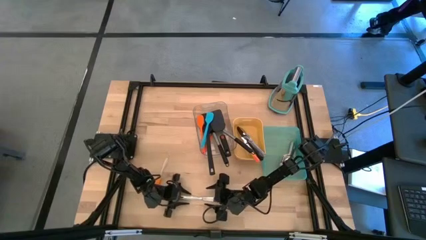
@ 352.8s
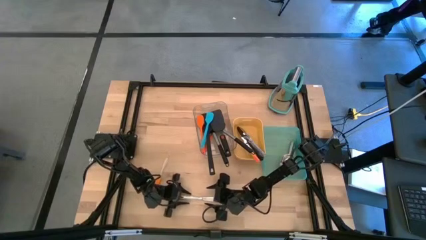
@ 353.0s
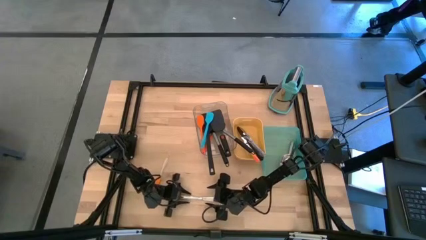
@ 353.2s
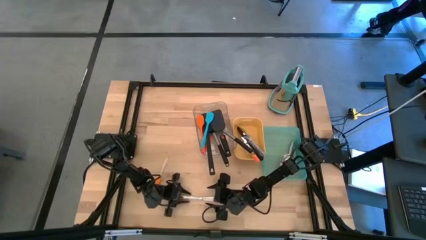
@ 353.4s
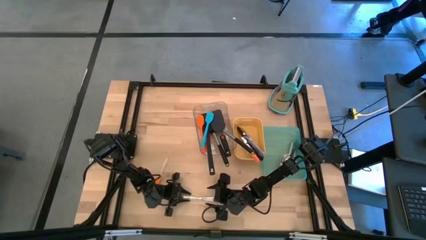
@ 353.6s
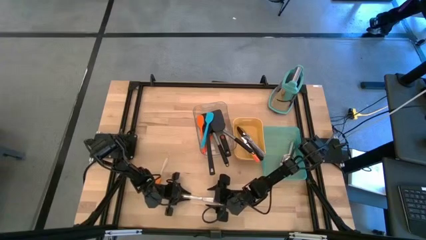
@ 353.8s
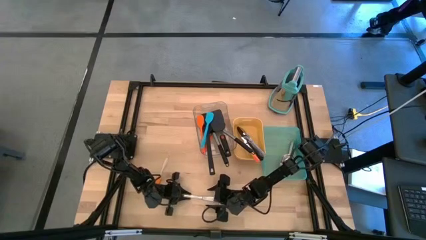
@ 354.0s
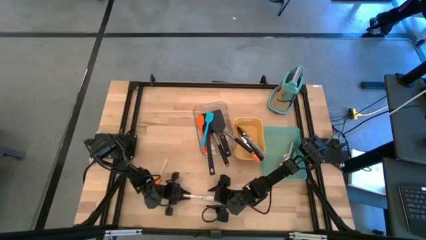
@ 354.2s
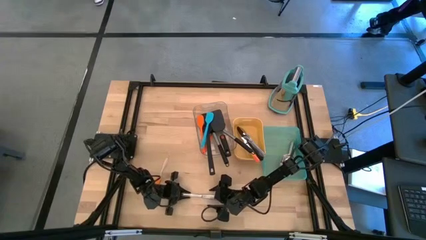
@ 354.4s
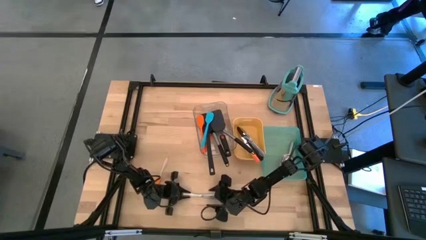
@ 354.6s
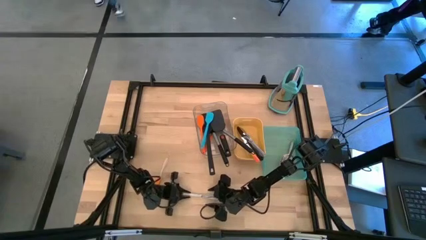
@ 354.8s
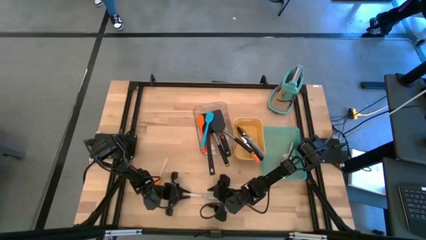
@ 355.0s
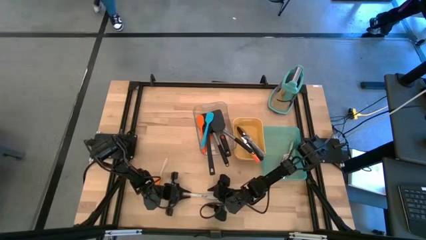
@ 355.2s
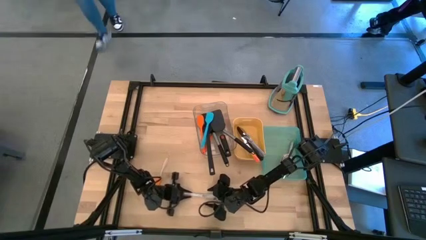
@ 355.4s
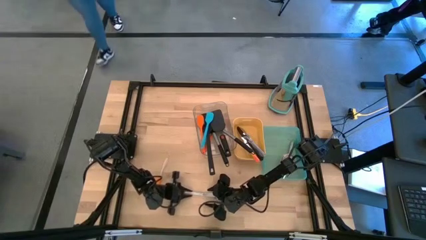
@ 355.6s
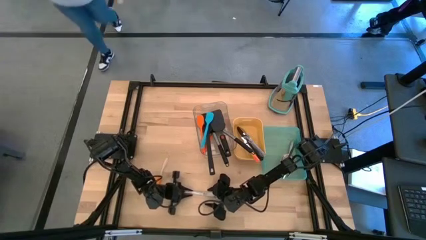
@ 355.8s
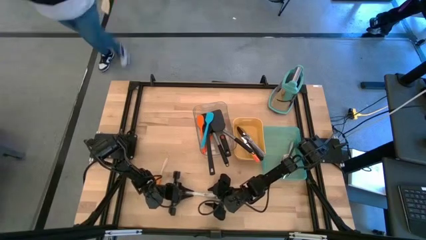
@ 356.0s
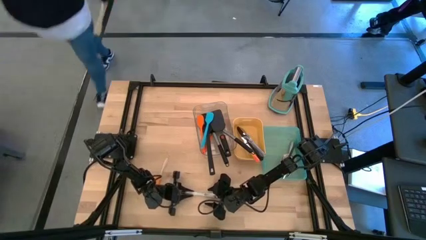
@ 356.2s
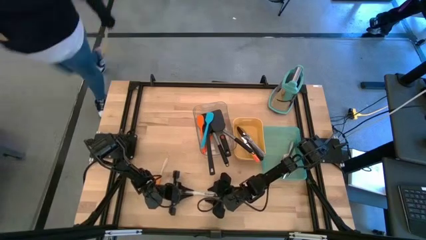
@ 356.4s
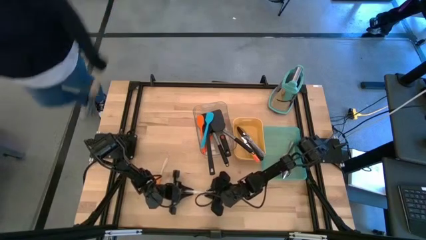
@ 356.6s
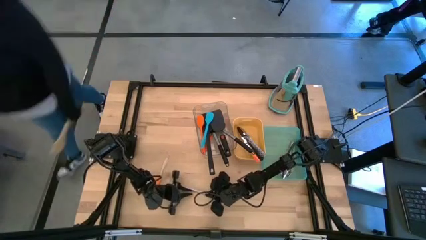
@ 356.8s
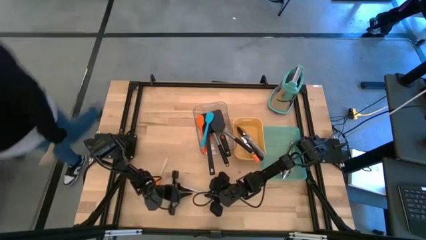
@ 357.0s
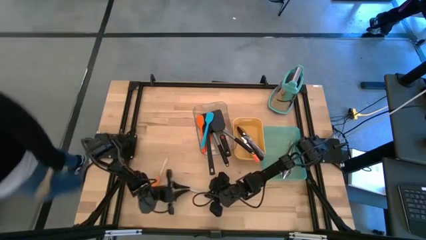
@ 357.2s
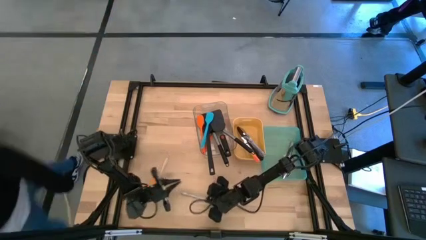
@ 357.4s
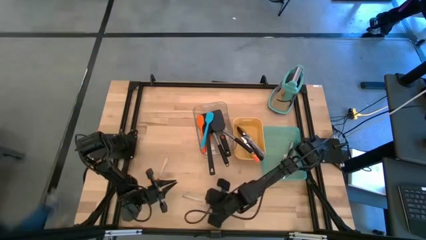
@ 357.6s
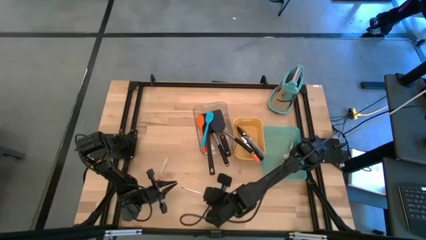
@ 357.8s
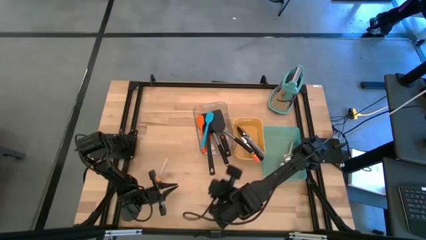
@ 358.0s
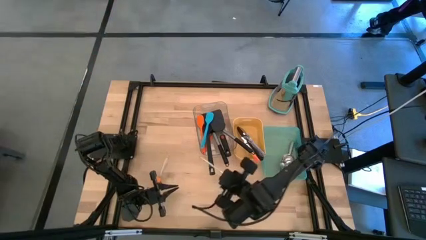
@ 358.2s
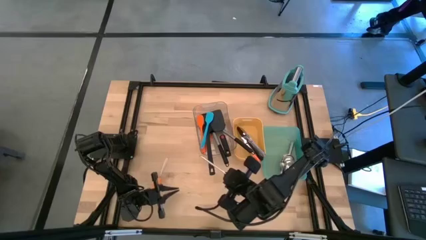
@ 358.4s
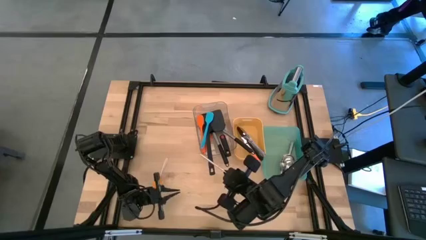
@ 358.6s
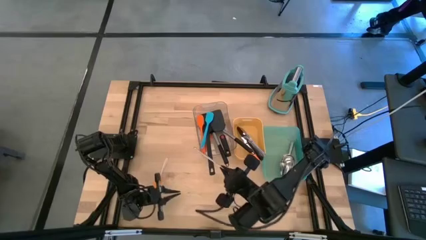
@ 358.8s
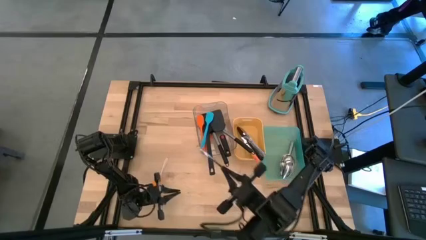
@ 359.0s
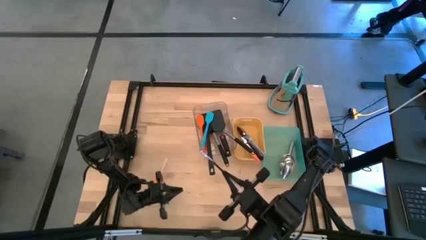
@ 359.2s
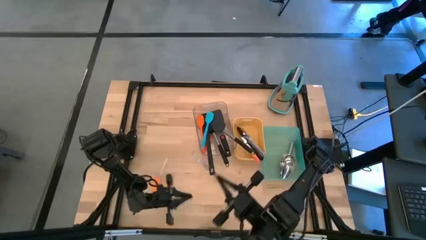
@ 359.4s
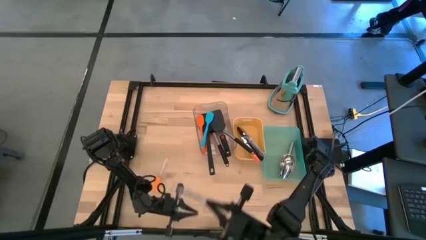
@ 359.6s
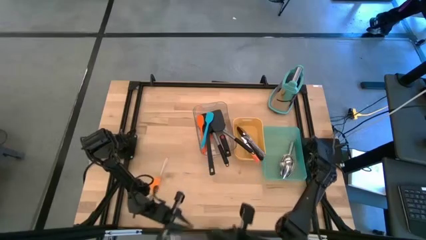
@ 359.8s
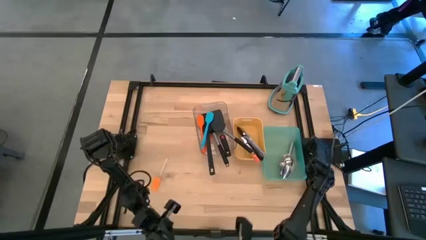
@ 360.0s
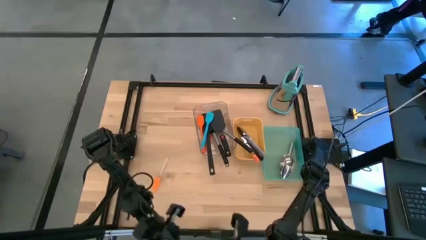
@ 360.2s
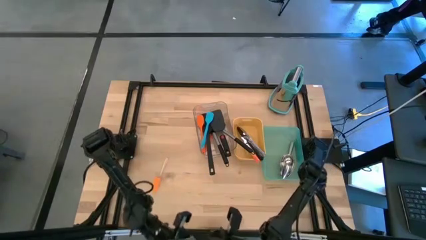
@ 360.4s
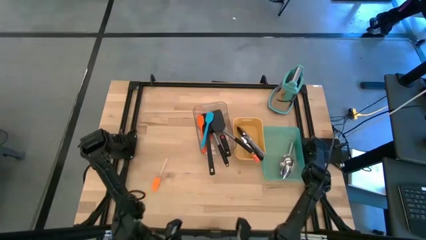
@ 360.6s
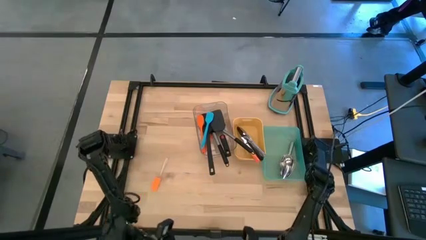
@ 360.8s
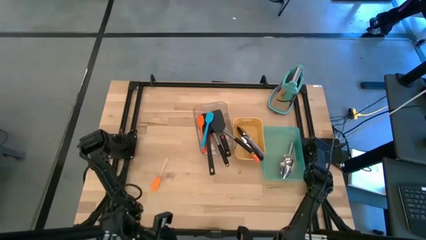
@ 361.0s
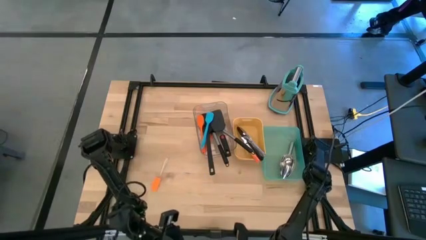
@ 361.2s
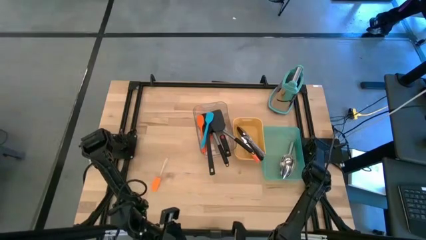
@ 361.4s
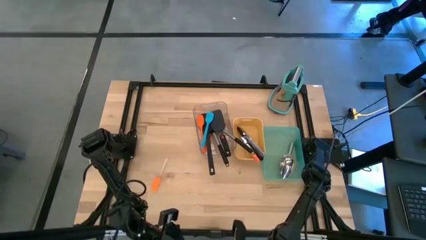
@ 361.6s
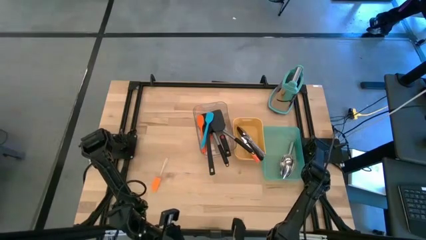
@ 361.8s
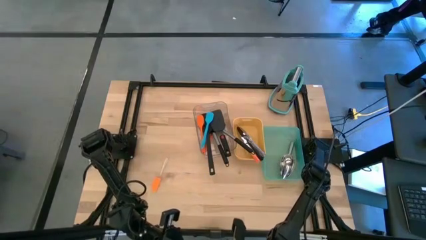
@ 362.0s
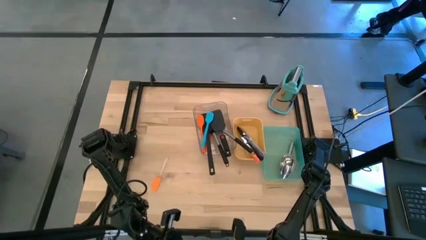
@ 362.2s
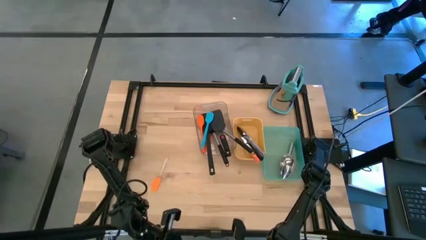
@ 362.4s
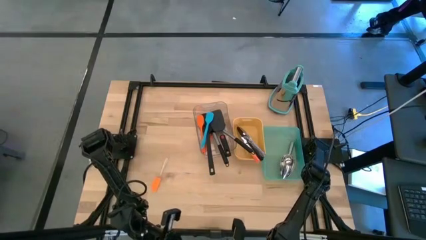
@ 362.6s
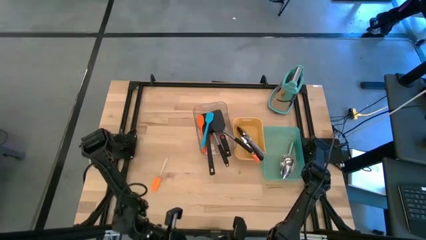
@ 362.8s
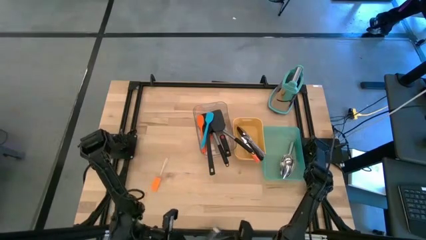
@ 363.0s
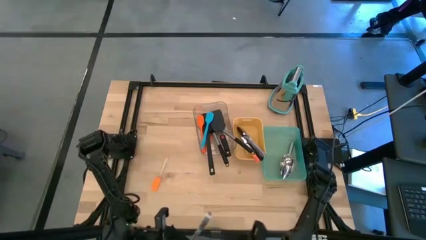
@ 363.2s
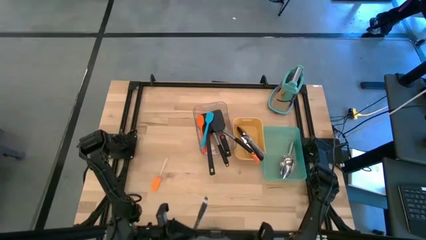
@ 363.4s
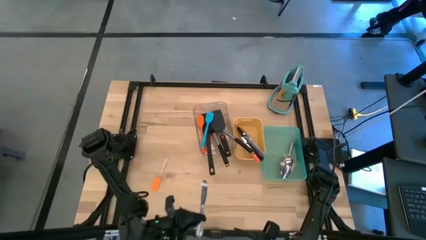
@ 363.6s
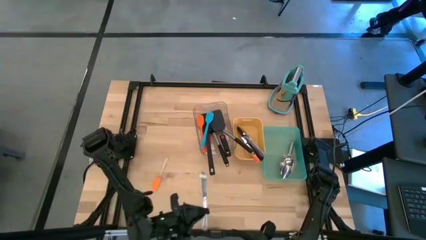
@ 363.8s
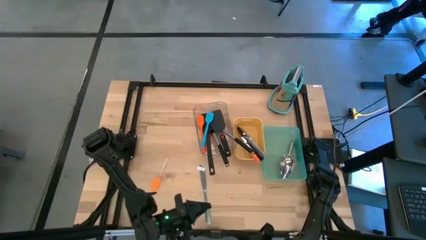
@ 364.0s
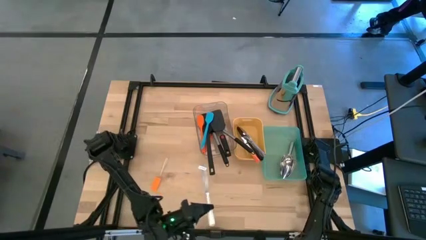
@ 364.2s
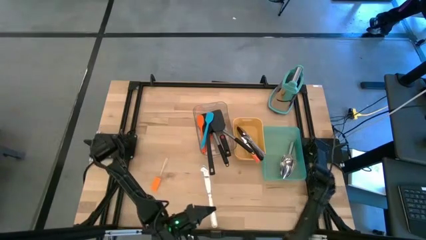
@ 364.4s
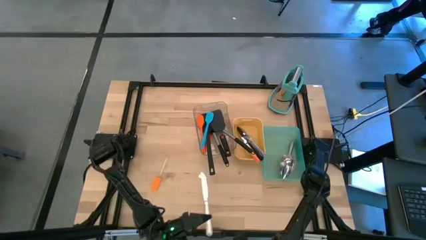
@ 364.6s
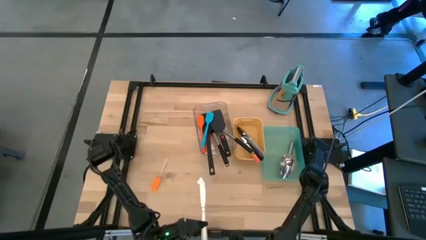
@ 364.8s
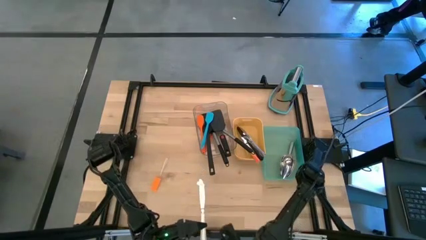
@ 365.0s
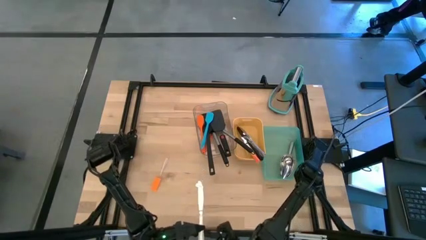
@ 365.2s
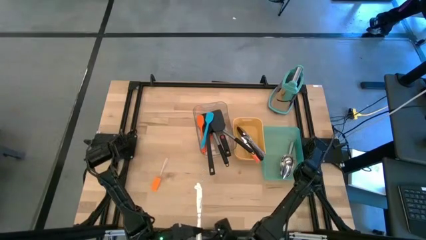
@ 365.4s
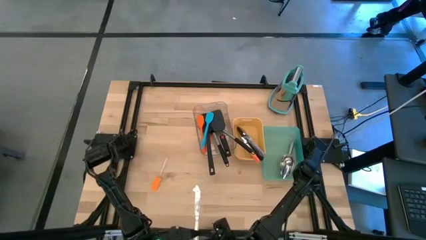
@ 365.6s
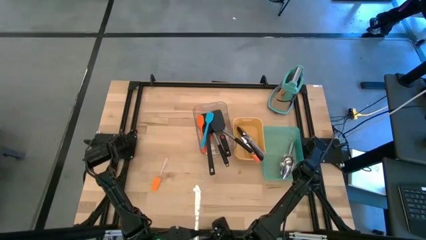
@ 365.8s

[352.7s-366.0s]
Task: Pick & Place Kitchen Items
Put the silver table knife into the yellow bin
